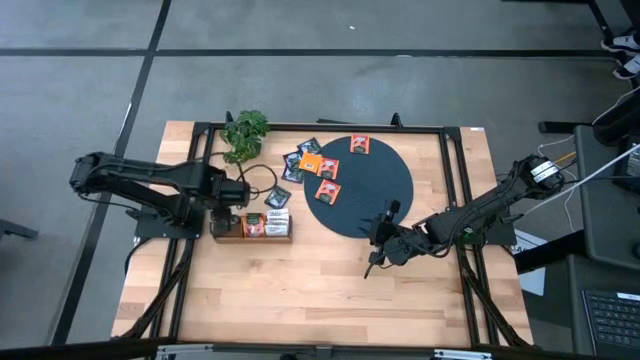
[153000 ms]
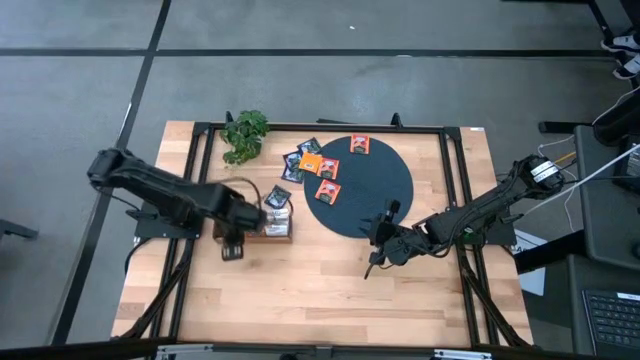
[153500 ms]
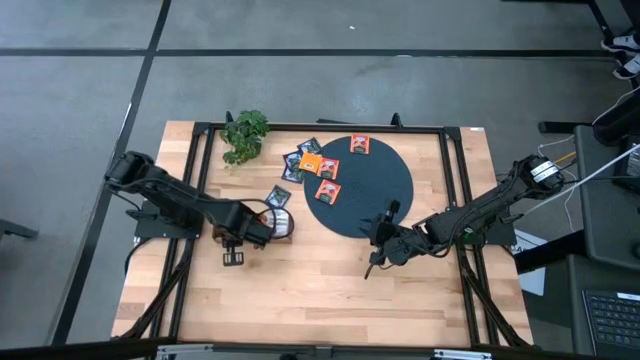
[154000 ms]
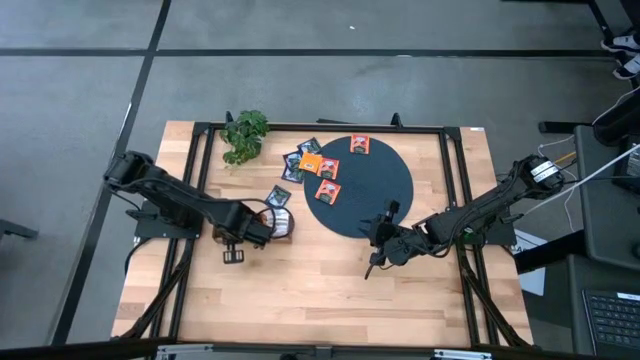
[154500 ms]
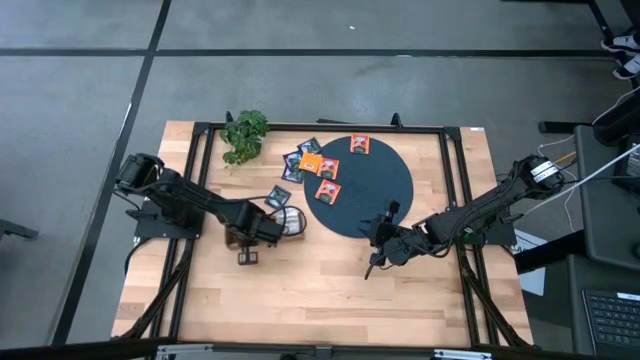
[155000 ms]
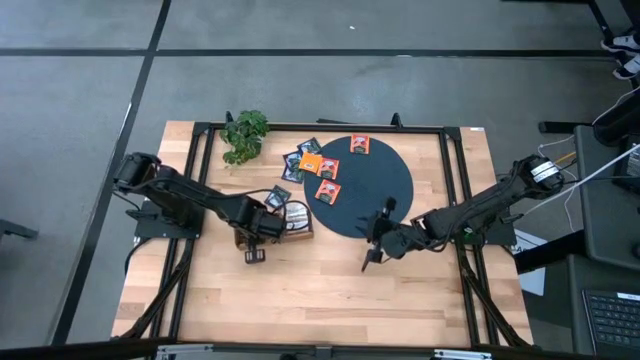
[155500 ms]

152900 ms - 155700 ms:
Task: Pick & Place Tea
Adjust the wooden organizer

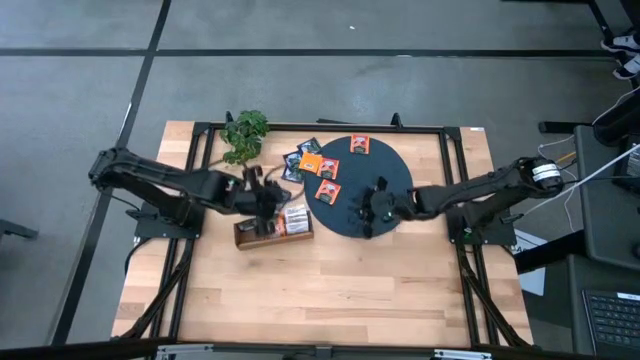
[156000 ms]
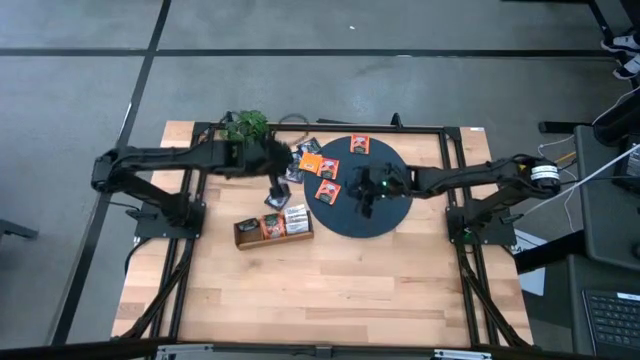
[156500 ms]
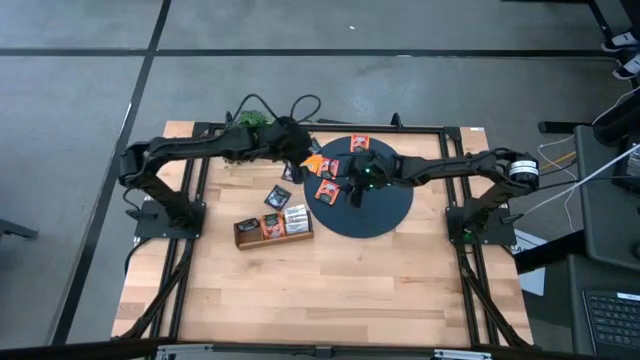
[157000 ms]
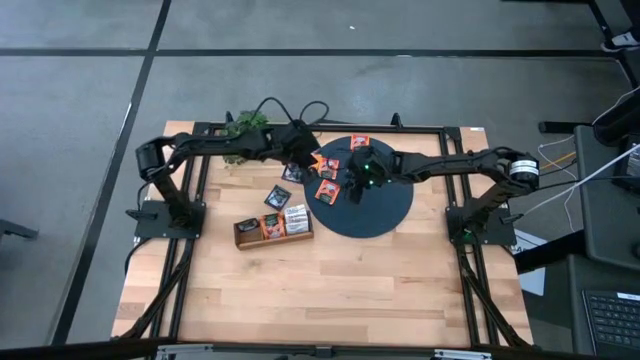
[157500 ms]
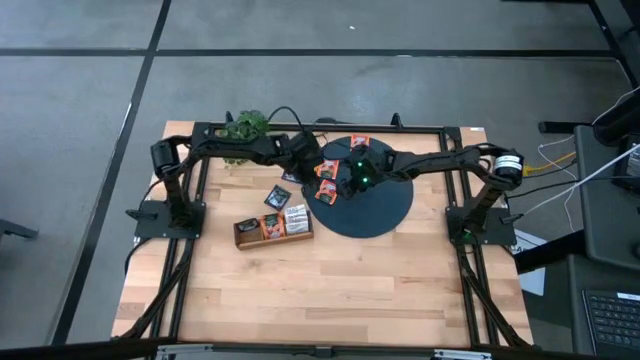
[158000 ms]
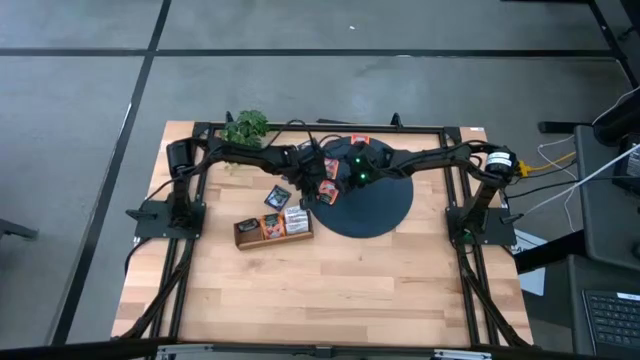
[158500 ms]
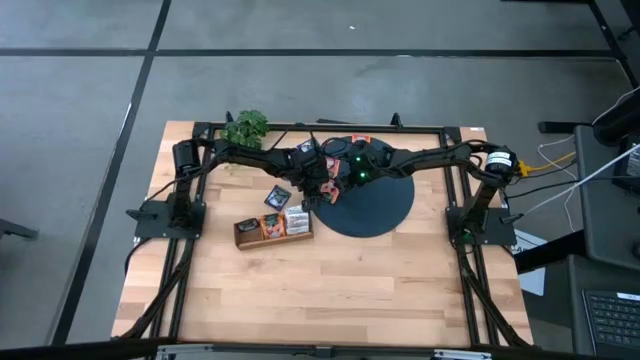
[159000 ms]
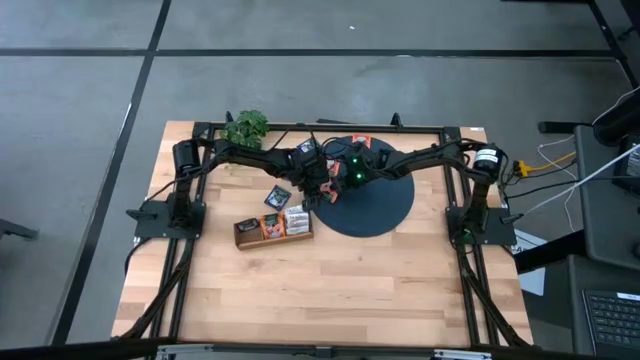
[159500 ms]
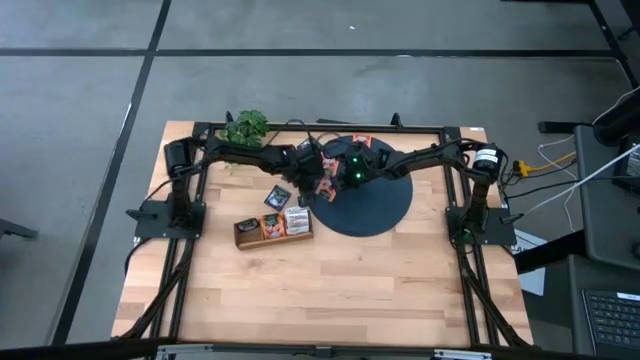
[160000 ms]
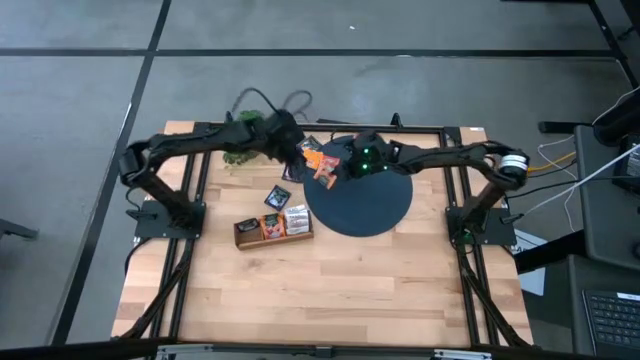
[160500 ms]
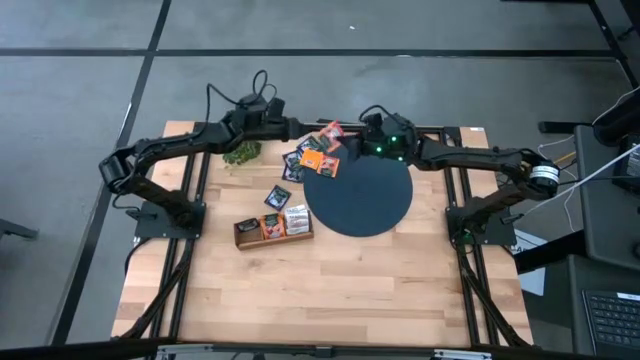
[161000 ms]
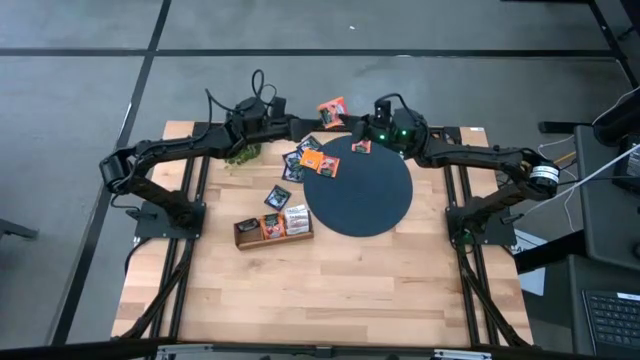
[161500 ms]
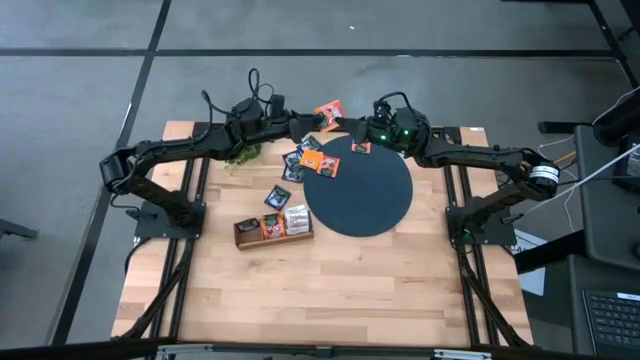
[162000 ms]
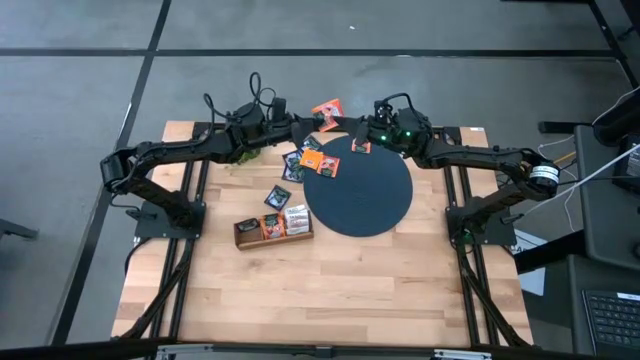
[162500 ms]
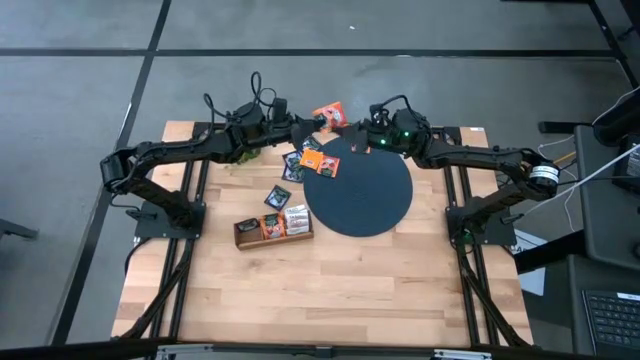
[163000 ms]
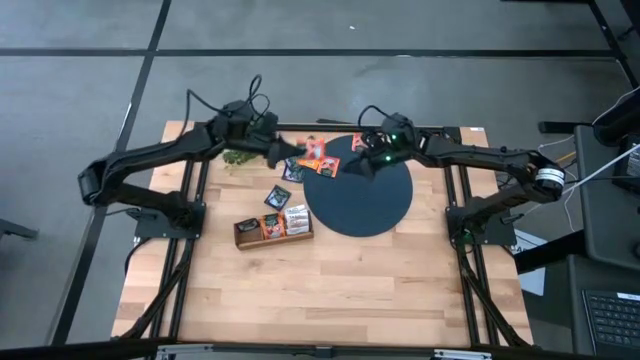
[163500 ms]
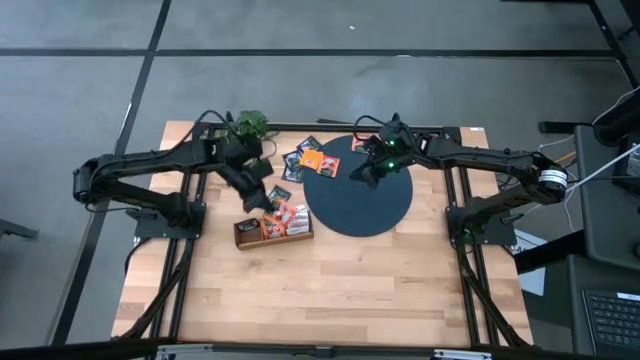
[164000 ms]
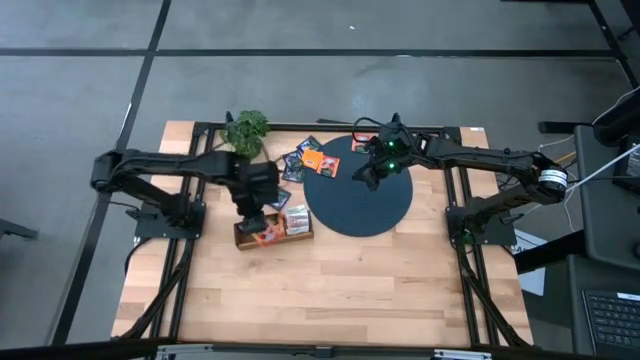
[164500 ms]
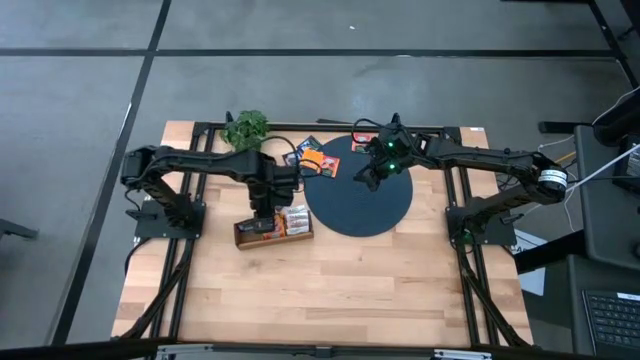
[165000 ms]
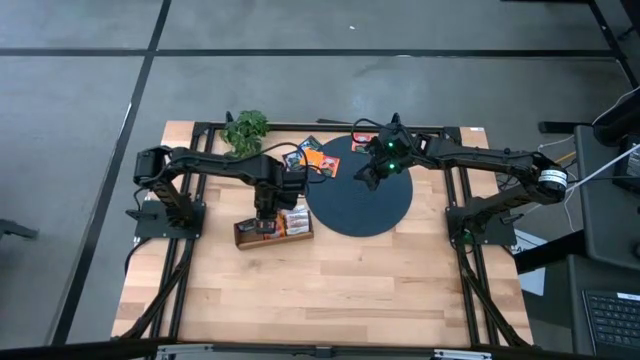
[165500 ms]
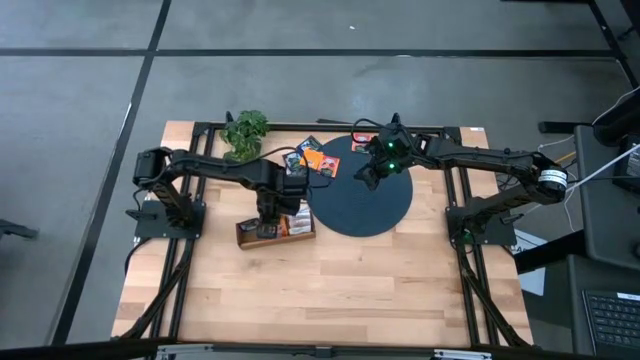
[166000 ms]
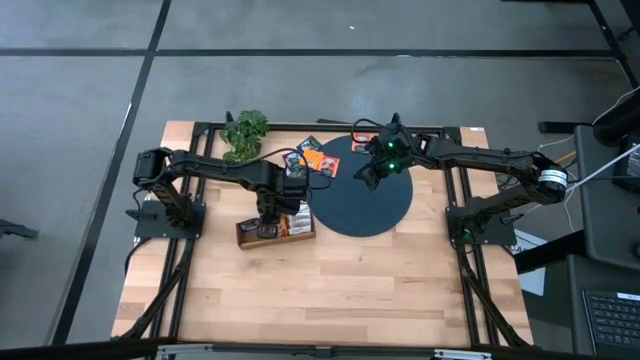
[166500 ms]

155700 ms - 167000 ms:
Put the orange tea bag into the middle section of the wooden organizer

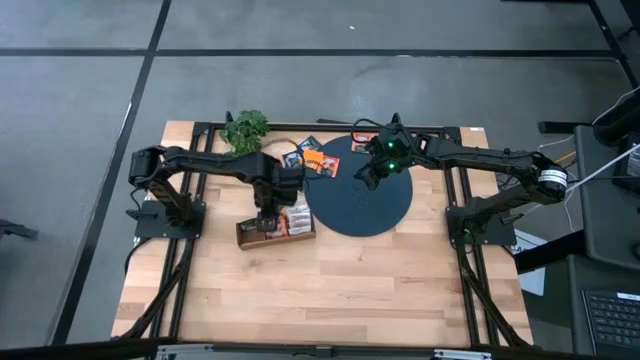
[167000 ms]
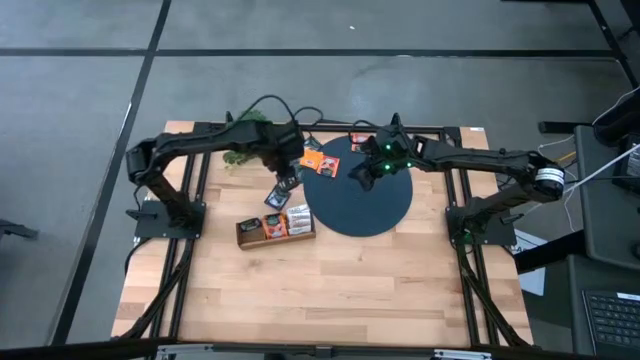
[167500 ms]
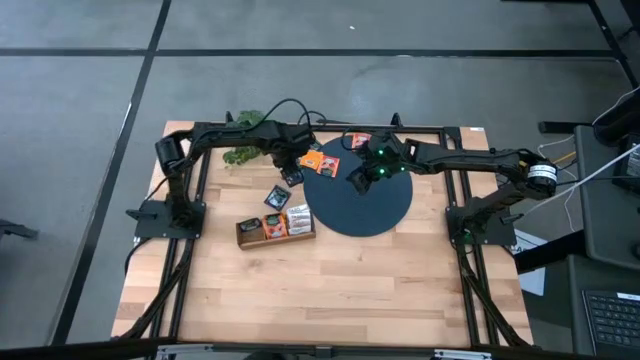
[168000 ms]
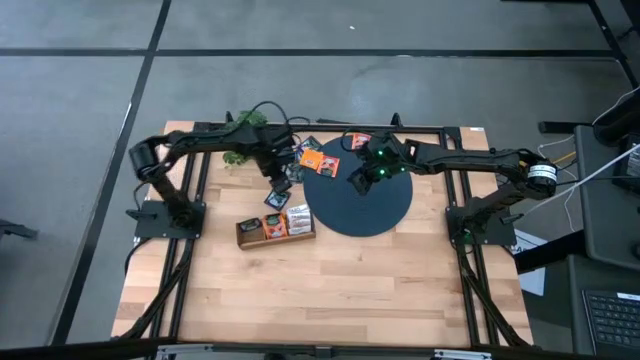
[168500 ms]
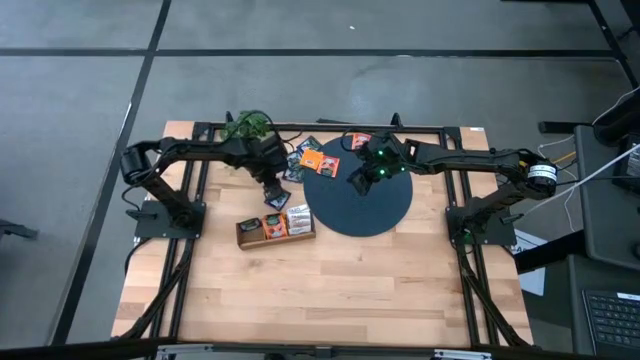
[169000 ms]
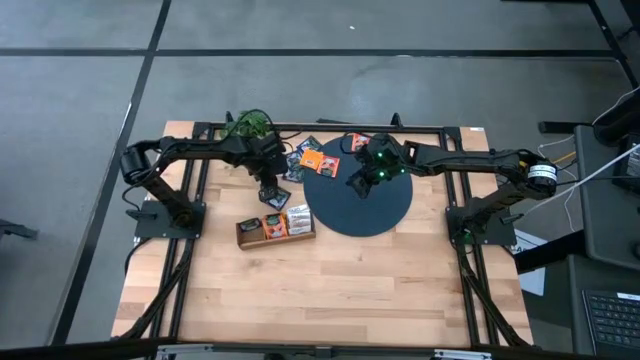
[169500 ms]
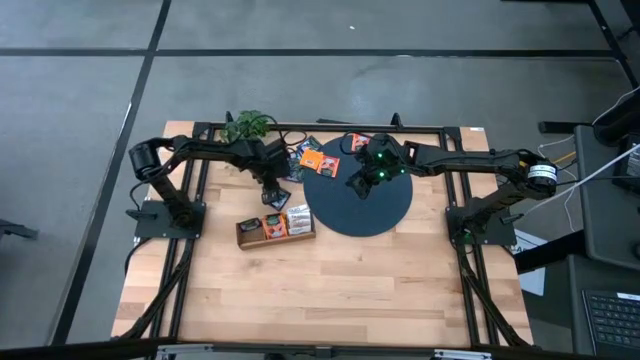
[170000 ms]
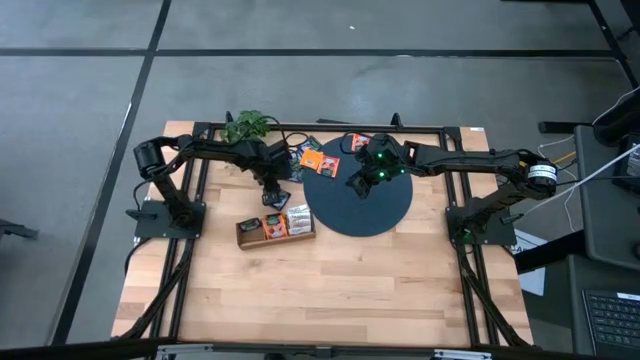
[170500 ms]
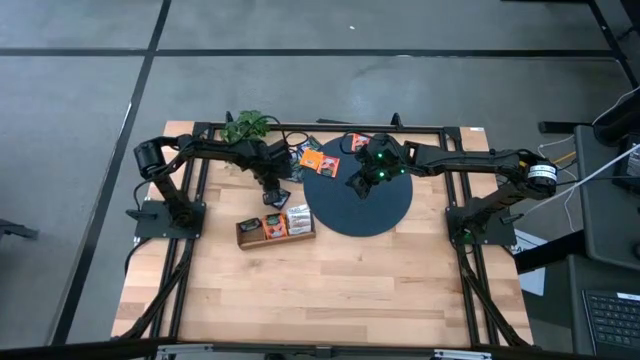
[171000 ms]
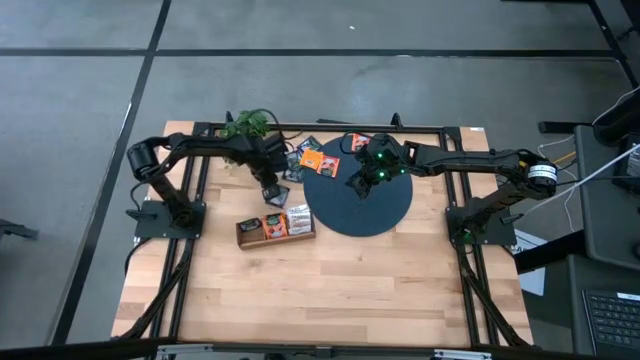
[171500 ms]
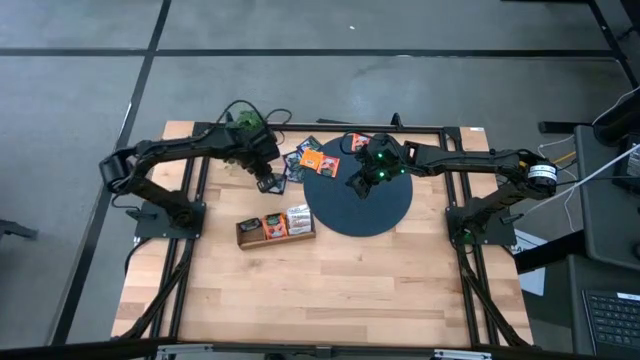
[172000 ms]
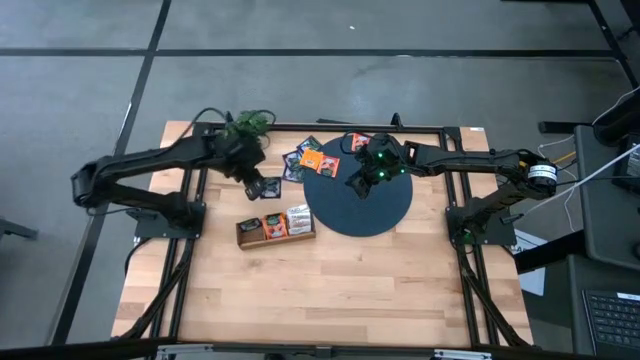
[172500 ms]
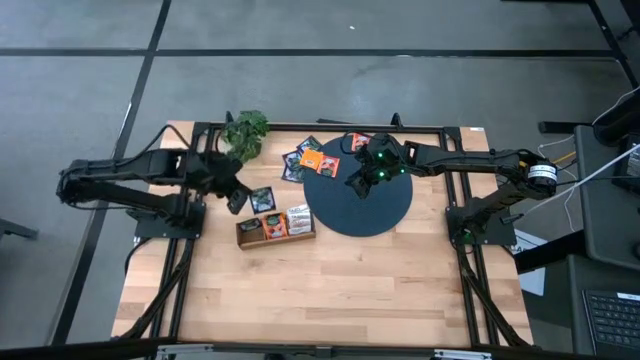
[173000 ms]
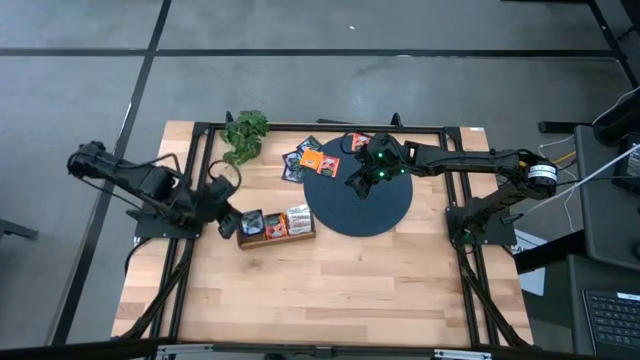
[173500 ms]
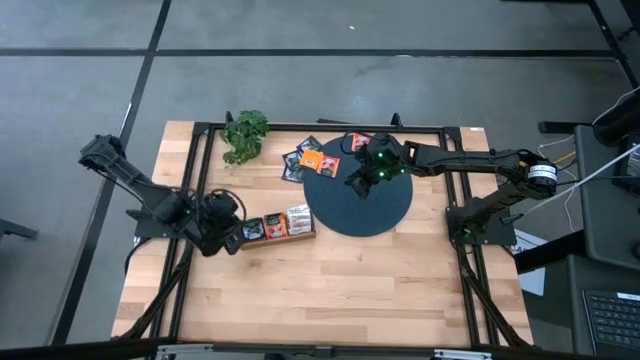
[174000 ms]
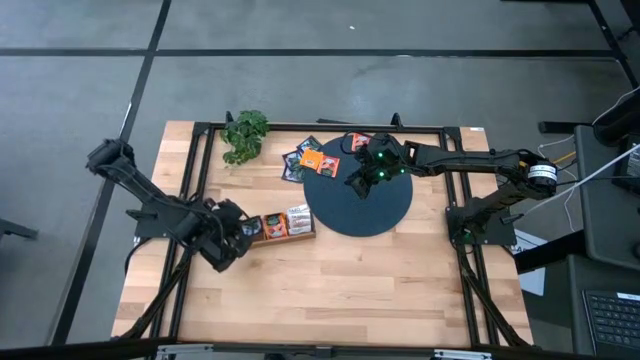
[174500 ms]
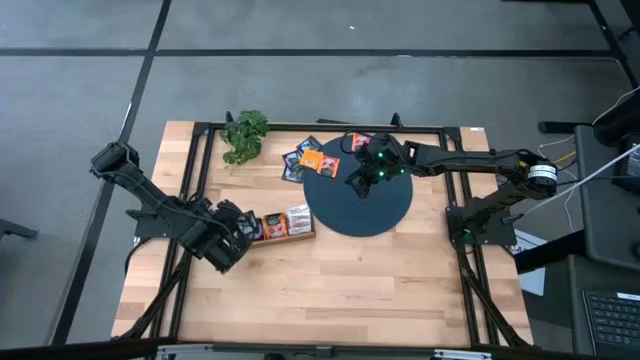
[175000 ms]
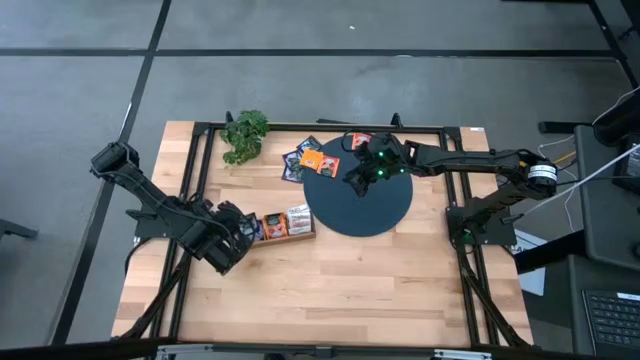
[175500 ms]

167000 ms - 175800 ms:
Put the purple tea bag into the left section of the wooden organizer
